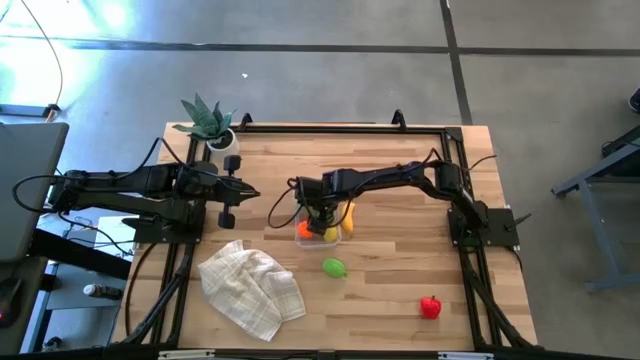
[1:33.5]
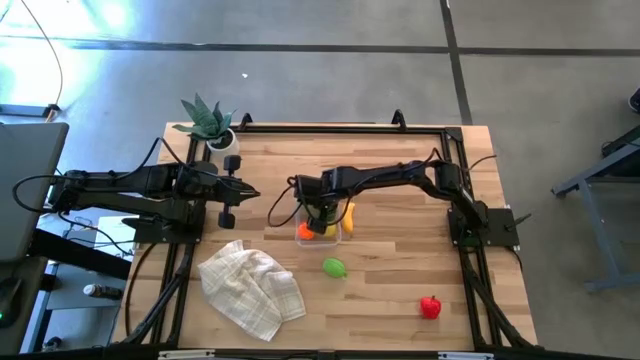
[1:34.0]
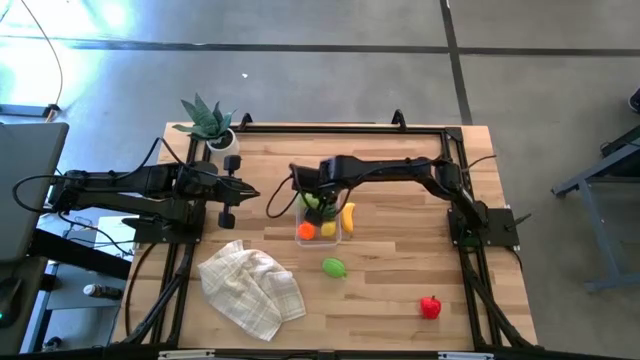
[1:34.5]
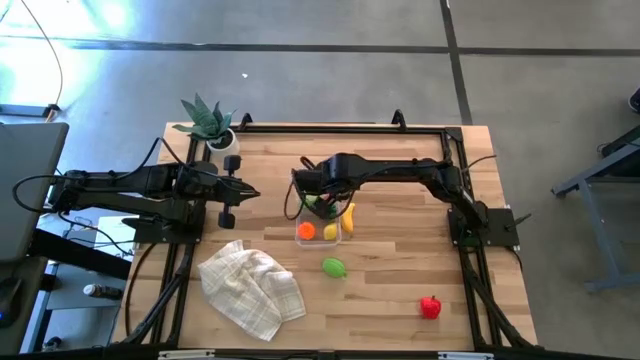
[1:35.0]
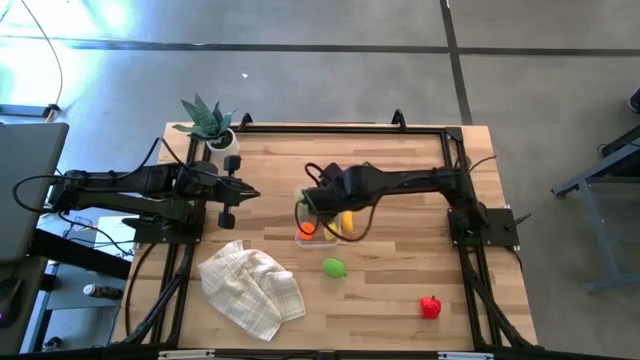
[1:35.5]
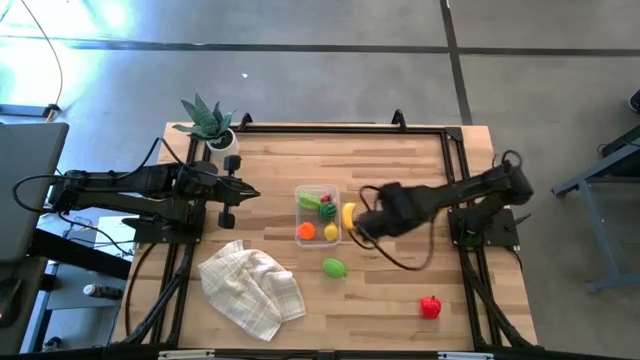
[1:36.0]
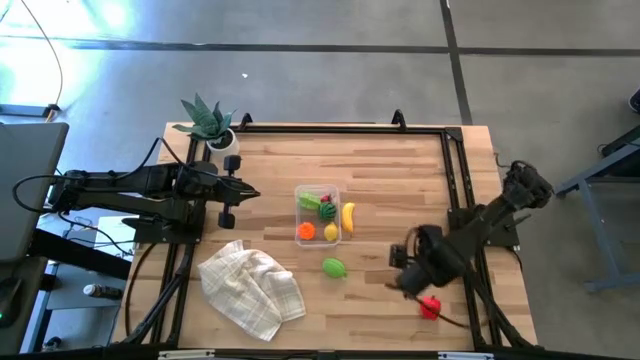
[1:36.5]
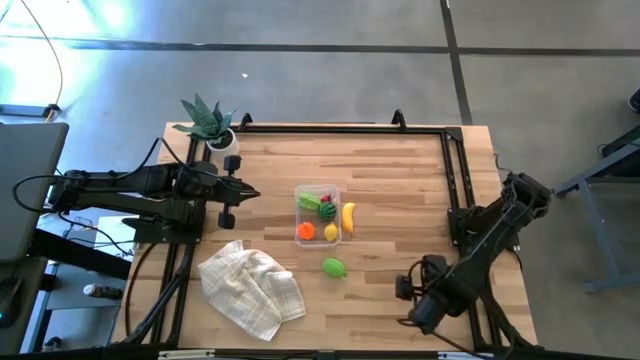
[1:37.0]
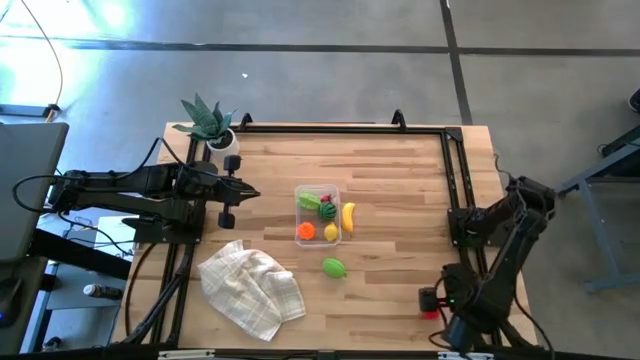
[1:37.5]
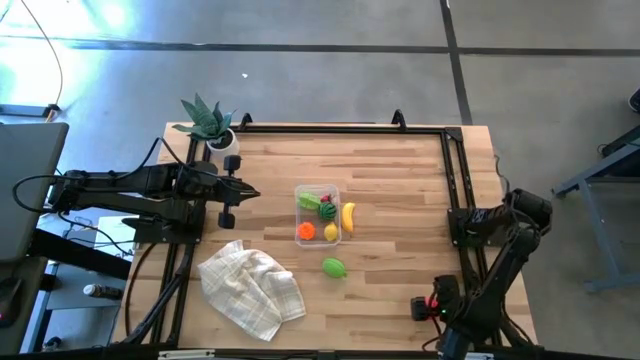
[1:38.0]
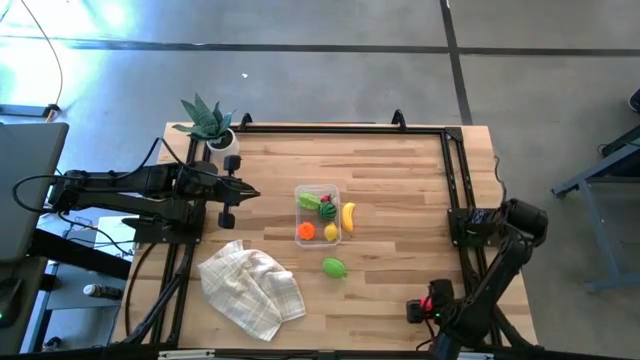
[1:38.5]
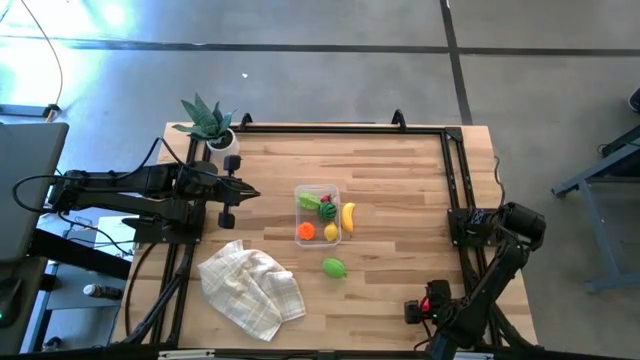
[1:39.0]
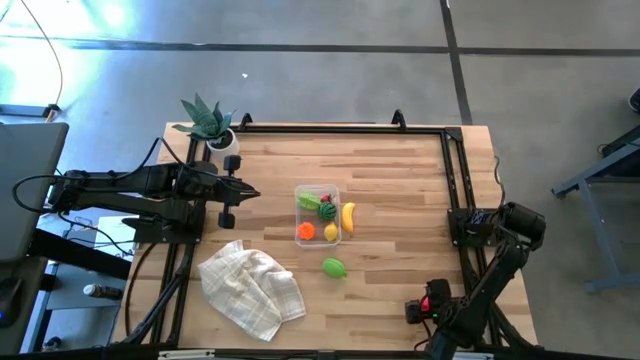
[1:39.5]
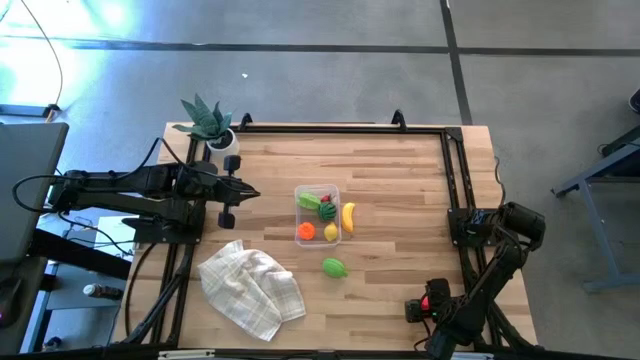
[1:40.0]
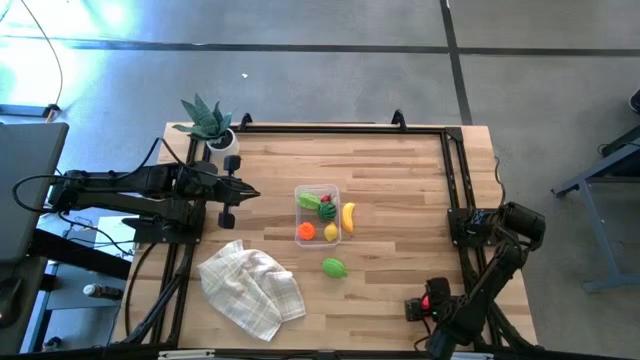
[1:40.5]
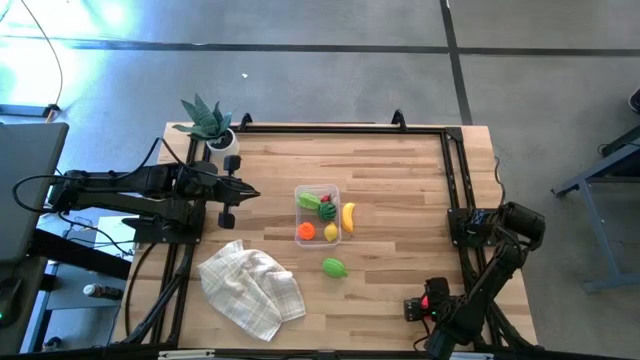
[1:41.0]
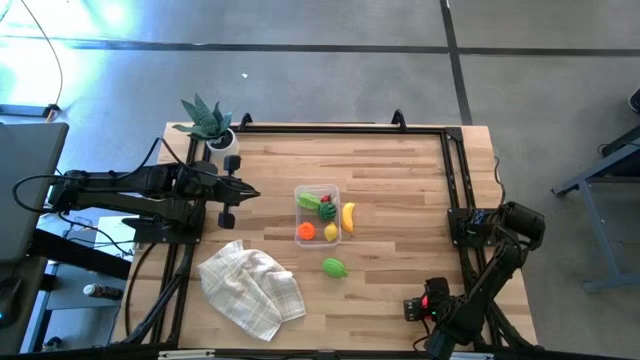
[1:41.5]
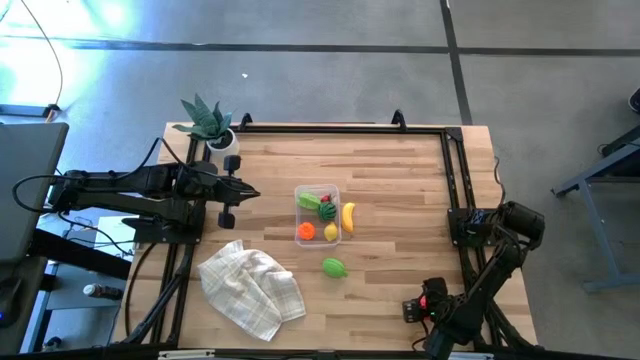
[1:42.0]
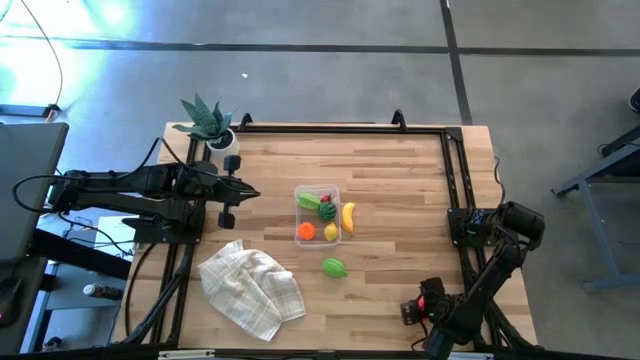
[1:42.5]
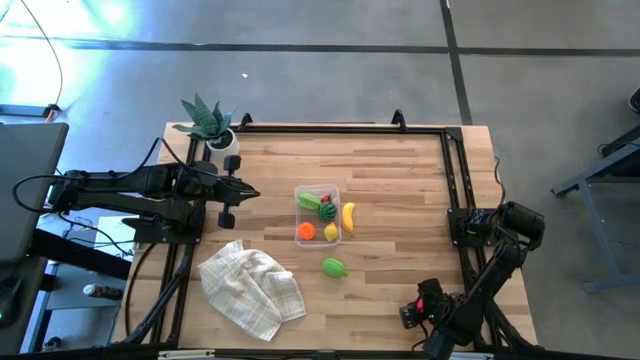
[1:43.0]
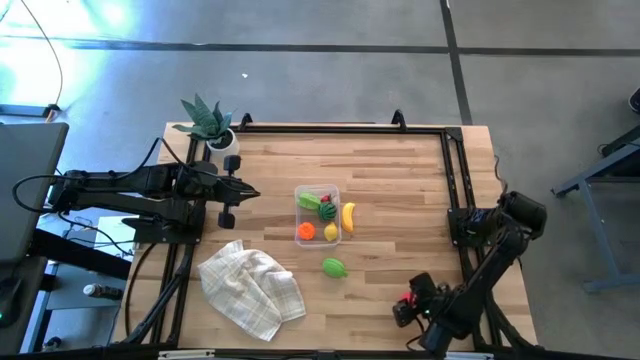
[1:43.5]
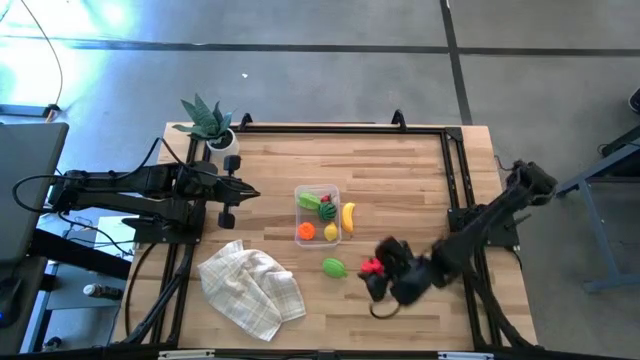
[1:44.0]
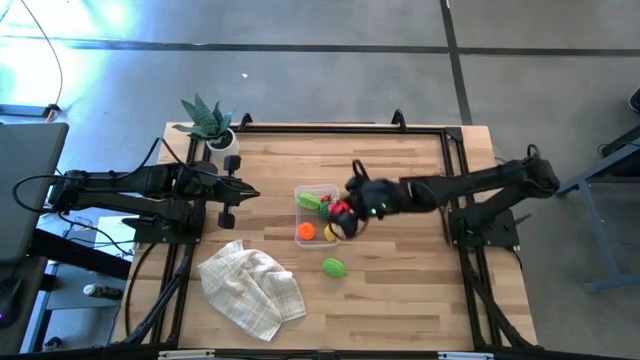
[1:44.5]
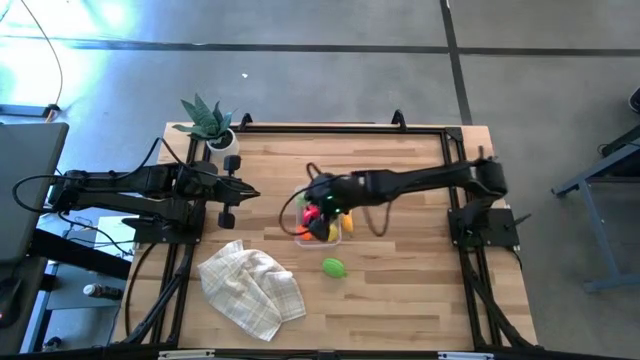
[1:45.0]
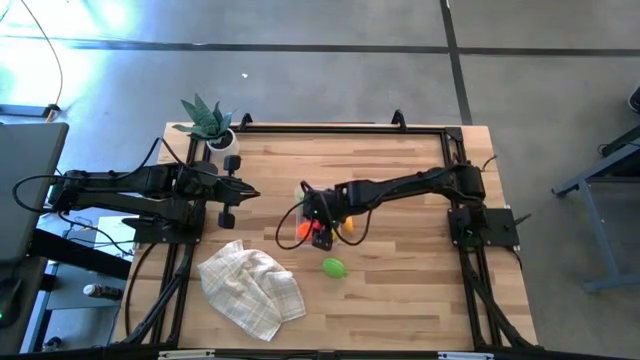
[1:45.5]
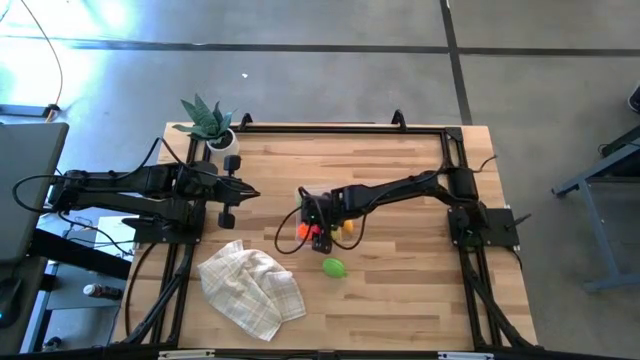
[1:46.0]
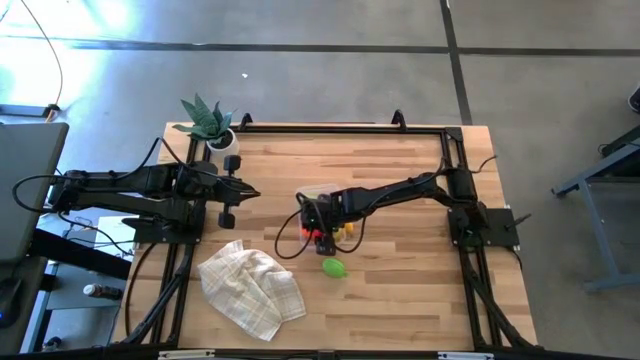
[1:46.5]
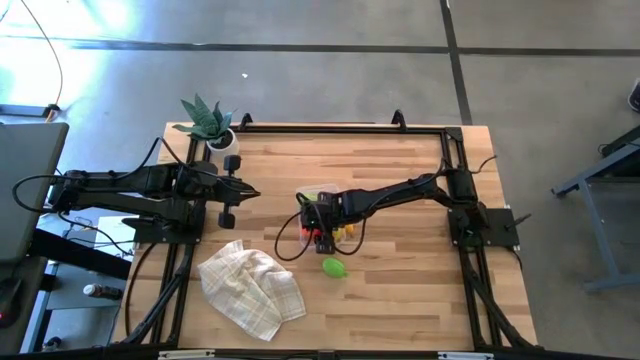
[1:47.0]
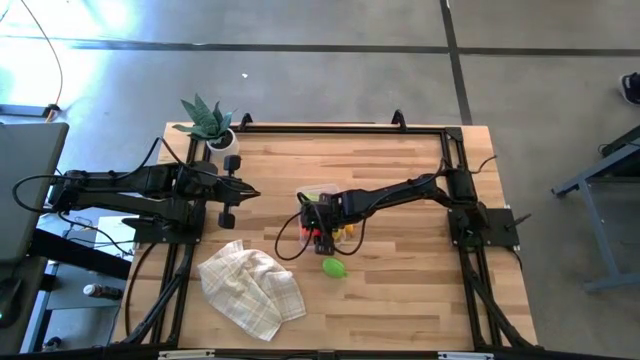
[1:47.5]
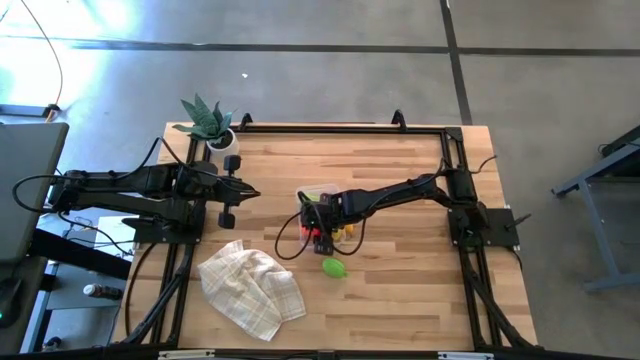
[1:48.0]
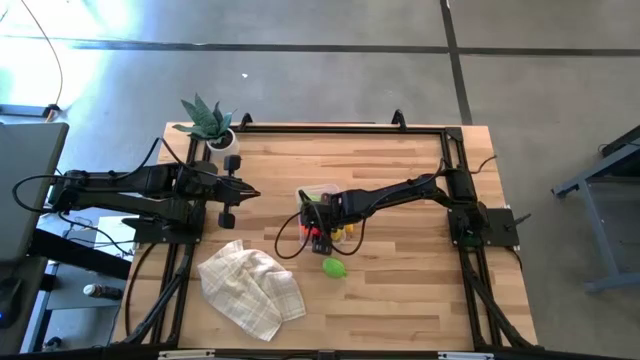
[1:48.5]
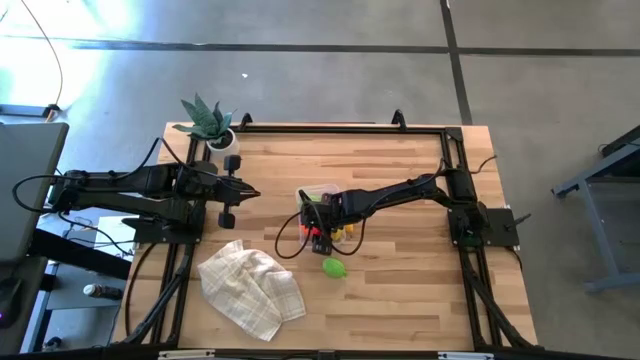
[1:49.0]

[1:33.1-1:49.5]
Task: Pick and placing Produce into tupperware
Put the red apple into the transparent bin

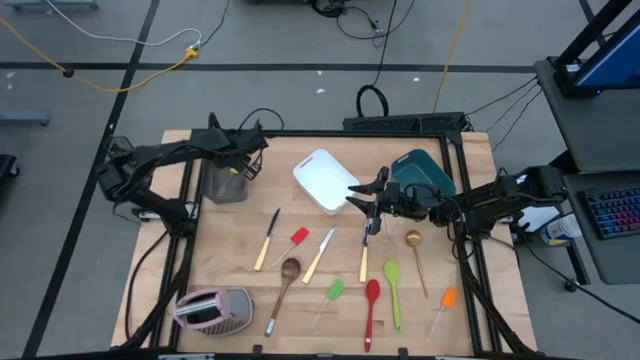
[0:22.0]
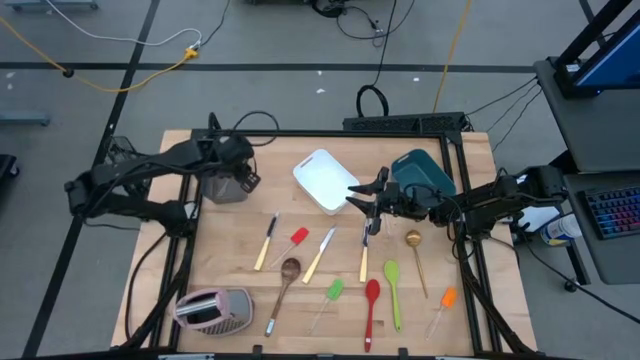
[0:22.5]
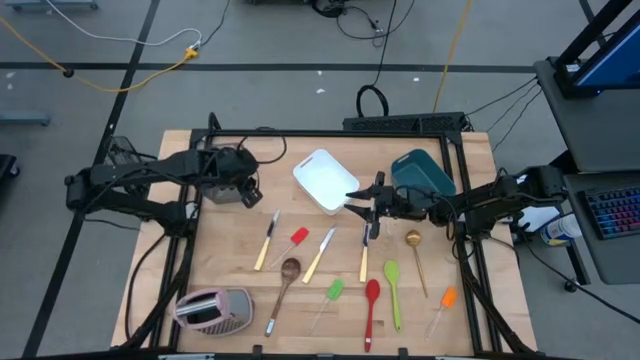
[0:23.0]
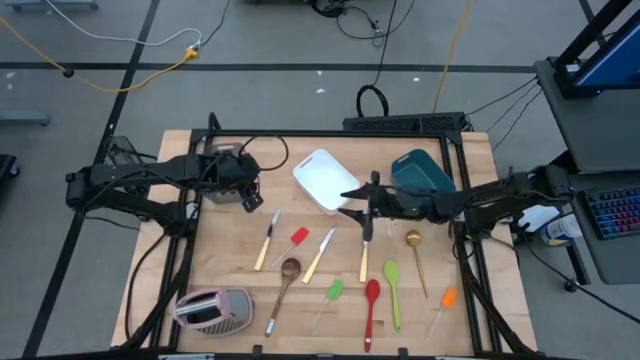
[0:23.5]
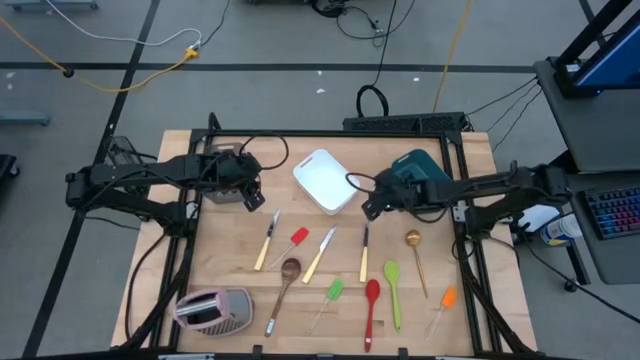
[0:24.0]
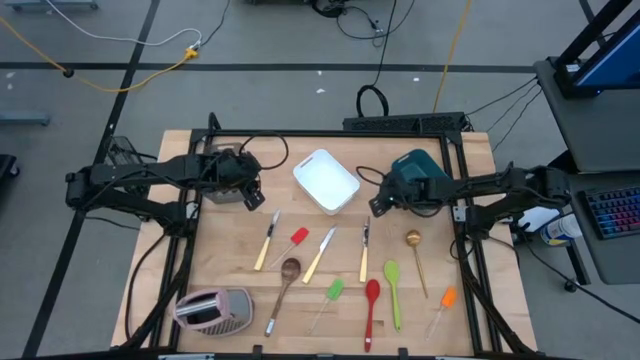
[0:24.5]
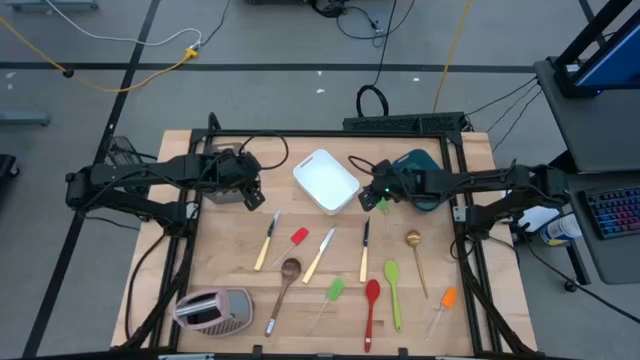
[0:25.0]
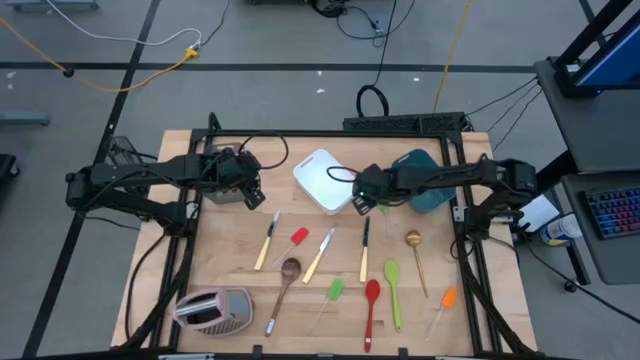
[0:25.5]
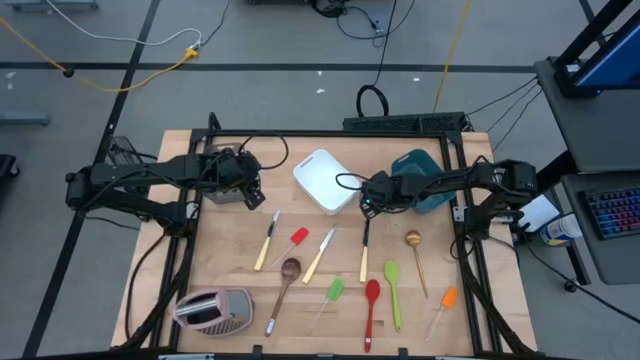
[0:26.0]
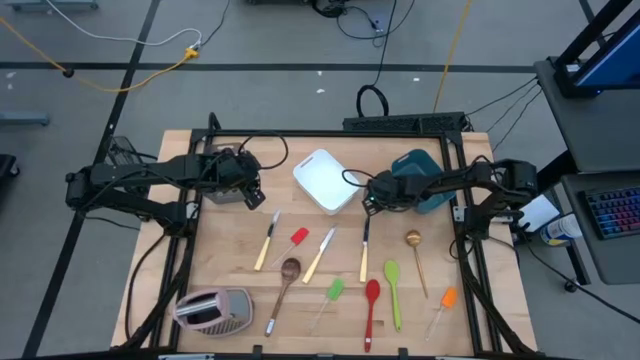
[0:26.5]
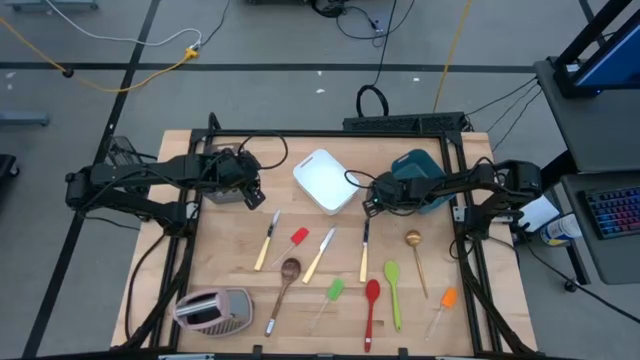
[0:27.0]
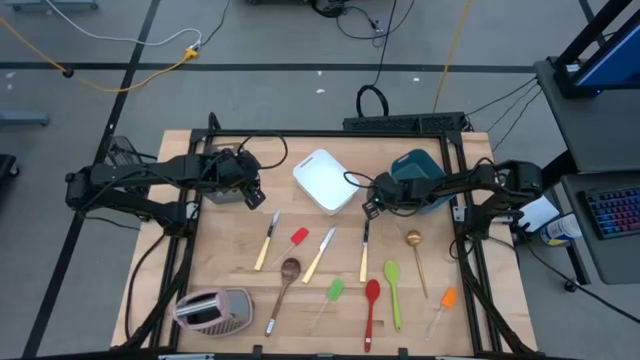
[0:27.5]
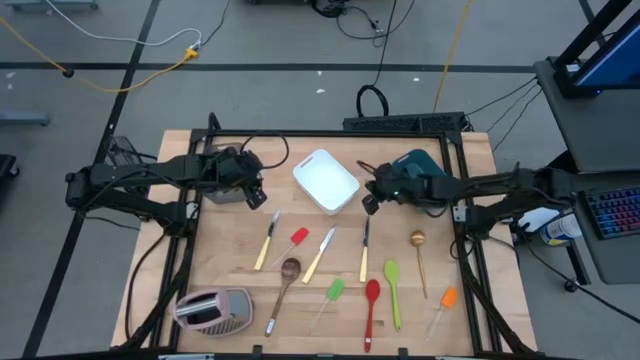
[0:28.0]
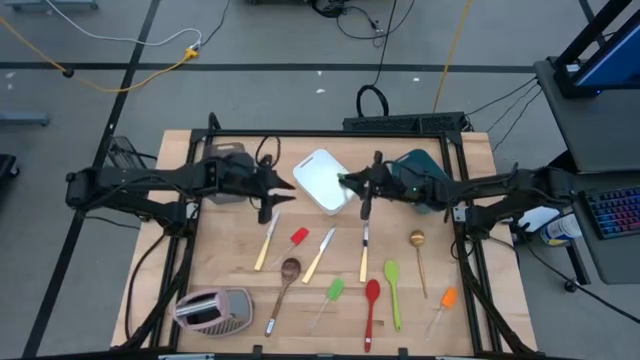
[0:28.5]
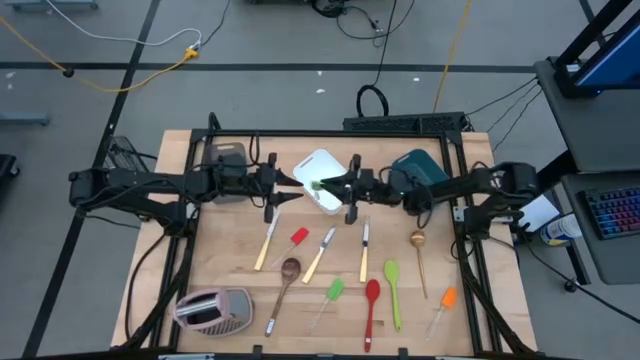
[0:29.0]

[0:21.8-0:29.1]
Task: Pick & Place Kitchen Items
Put the green spatula into the black bin
